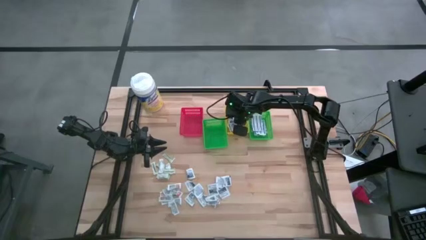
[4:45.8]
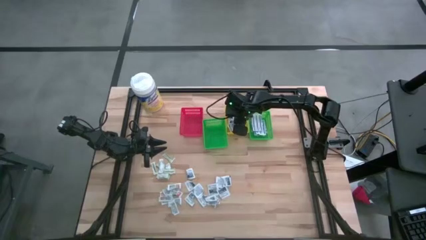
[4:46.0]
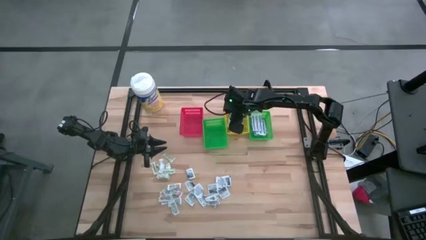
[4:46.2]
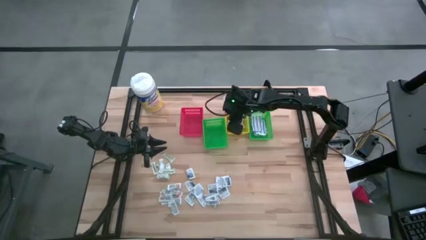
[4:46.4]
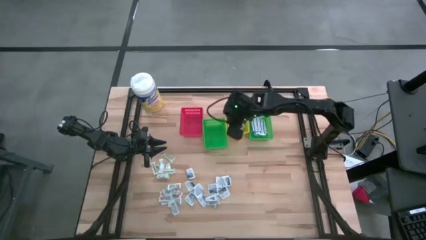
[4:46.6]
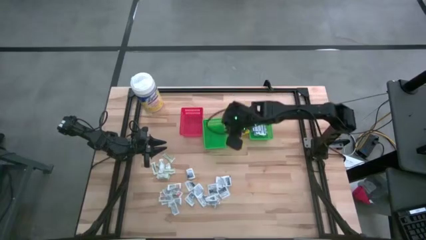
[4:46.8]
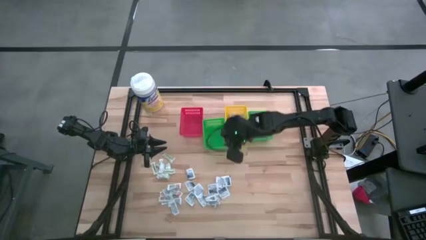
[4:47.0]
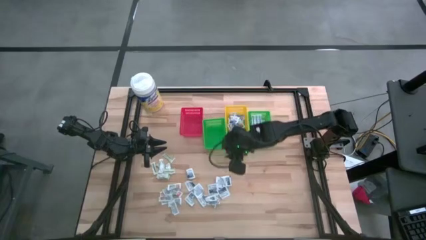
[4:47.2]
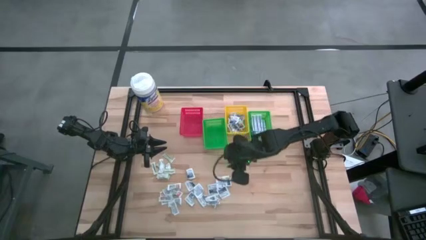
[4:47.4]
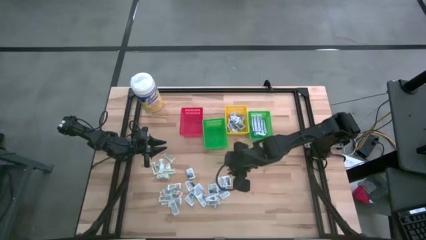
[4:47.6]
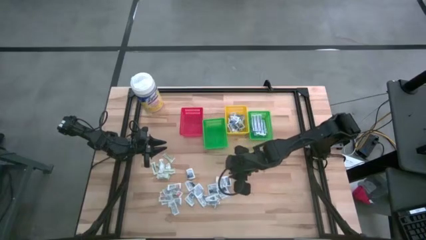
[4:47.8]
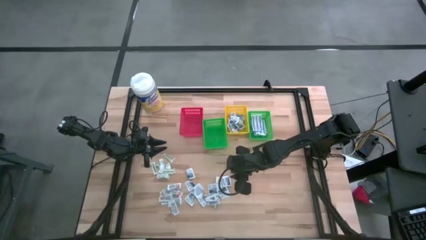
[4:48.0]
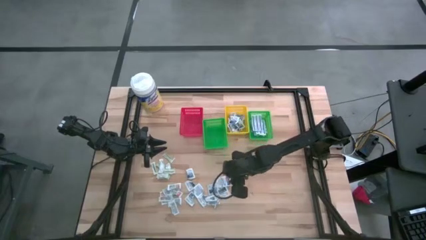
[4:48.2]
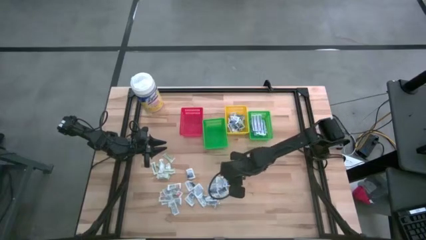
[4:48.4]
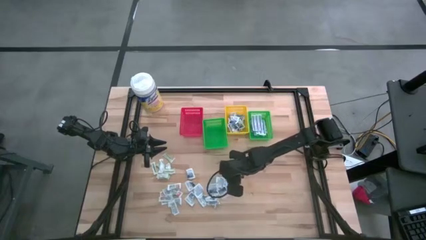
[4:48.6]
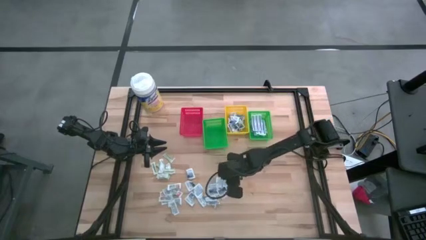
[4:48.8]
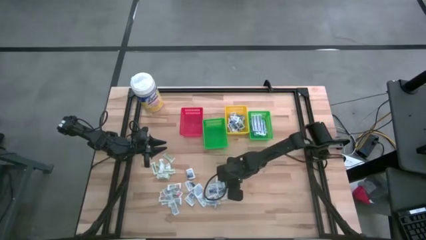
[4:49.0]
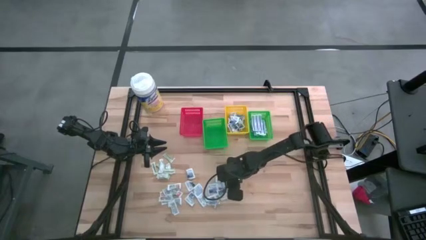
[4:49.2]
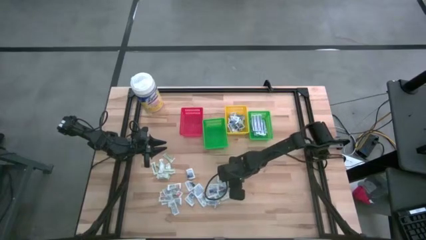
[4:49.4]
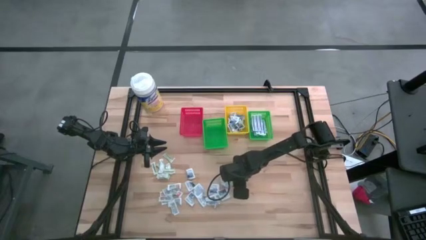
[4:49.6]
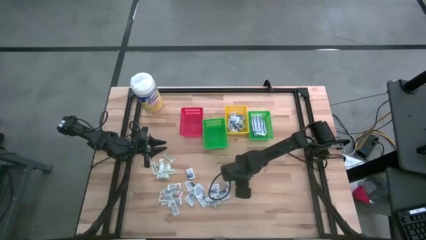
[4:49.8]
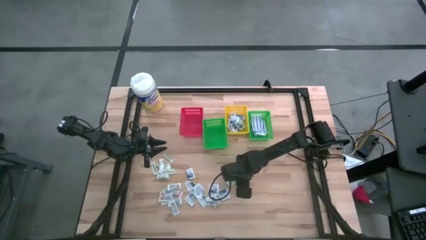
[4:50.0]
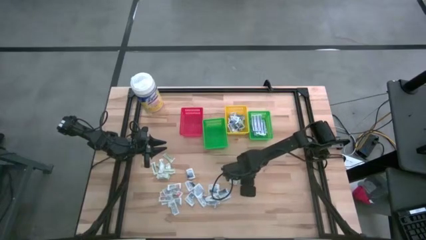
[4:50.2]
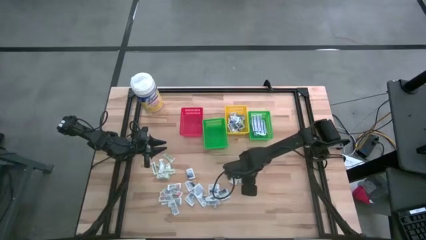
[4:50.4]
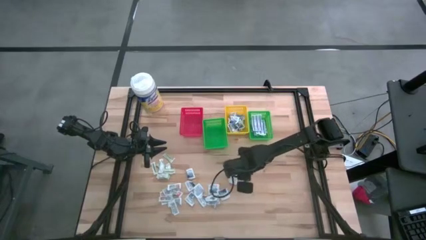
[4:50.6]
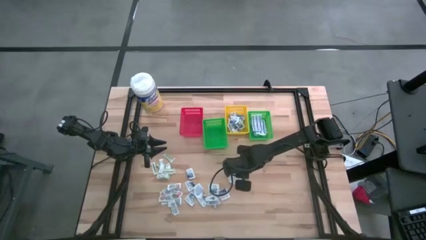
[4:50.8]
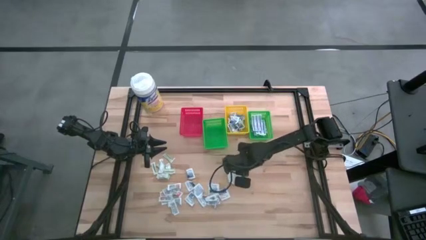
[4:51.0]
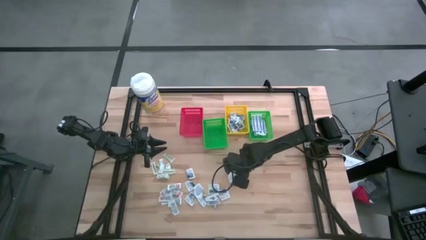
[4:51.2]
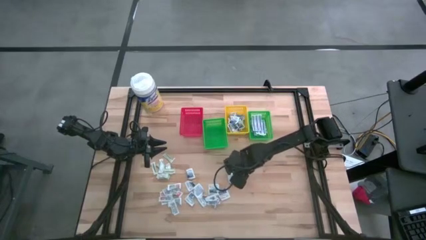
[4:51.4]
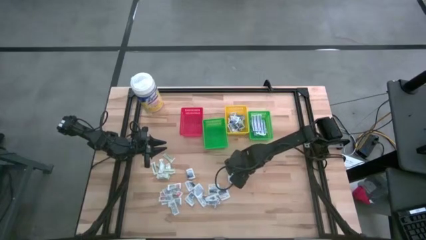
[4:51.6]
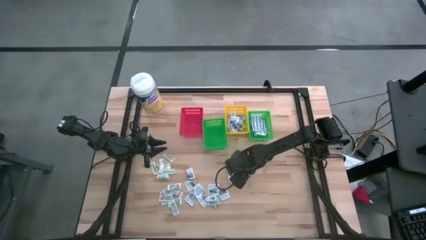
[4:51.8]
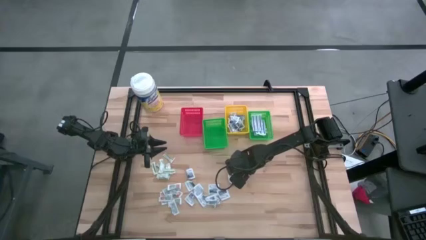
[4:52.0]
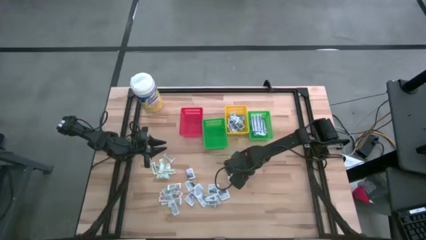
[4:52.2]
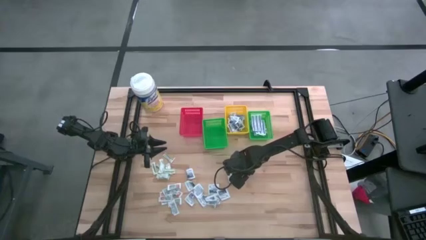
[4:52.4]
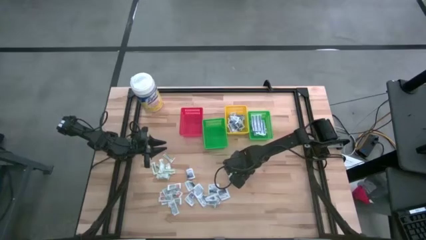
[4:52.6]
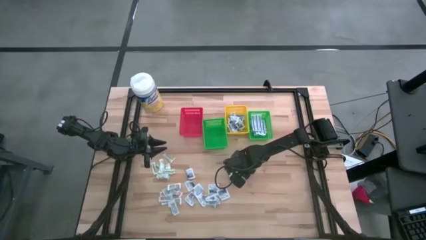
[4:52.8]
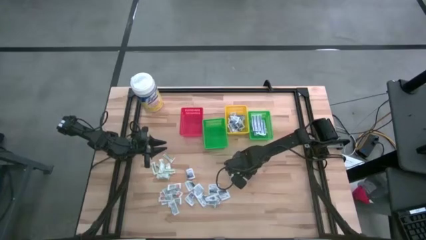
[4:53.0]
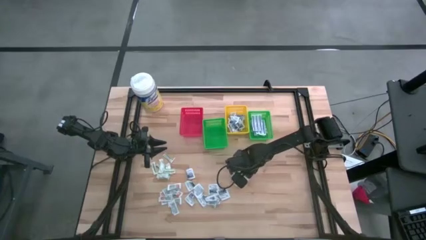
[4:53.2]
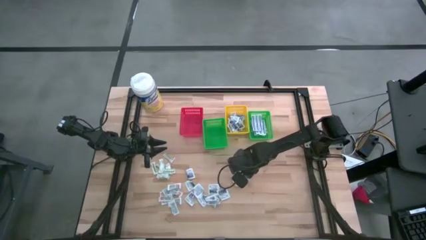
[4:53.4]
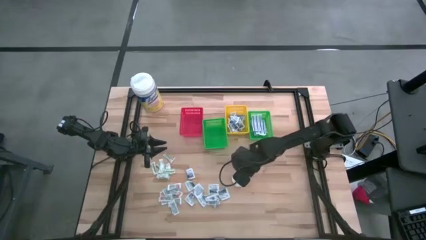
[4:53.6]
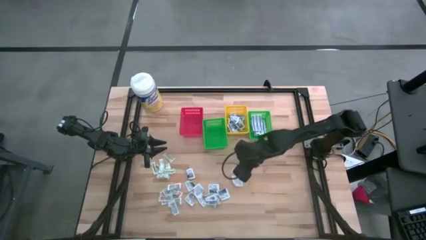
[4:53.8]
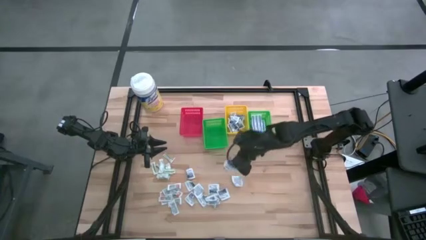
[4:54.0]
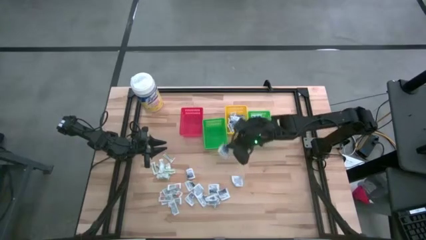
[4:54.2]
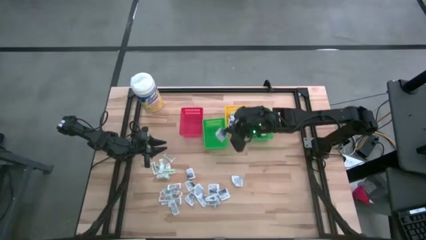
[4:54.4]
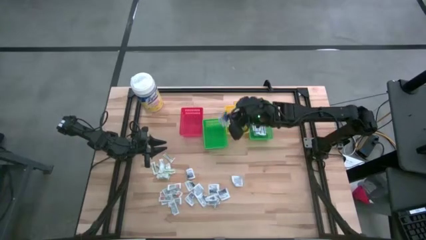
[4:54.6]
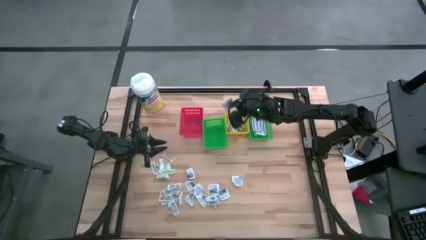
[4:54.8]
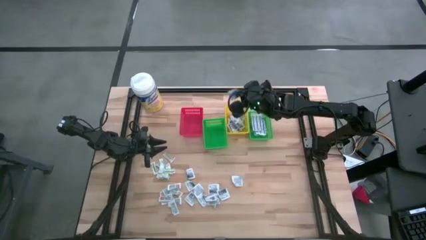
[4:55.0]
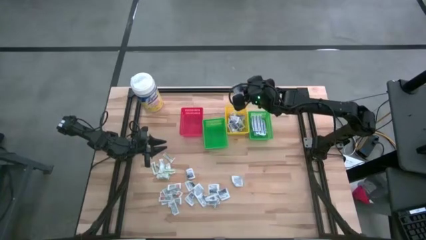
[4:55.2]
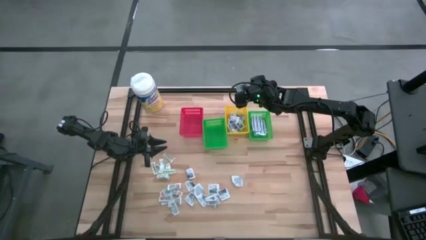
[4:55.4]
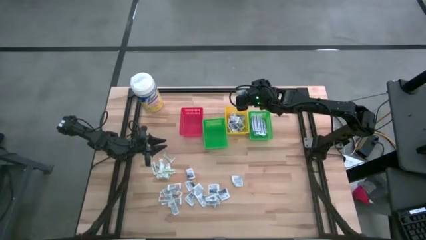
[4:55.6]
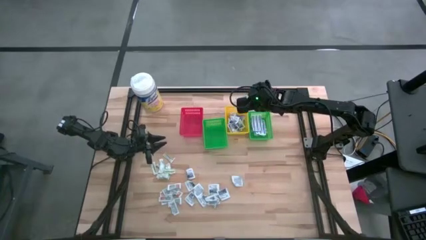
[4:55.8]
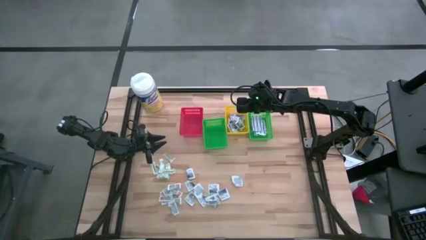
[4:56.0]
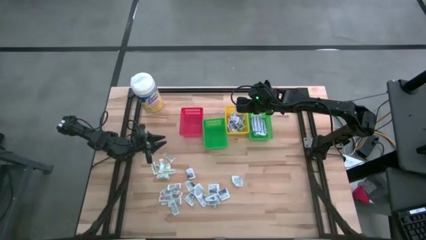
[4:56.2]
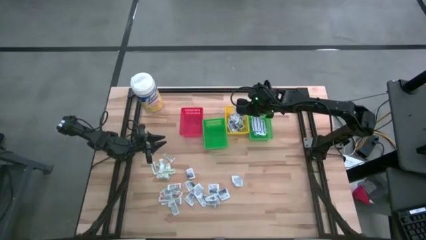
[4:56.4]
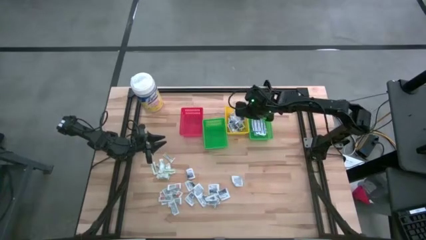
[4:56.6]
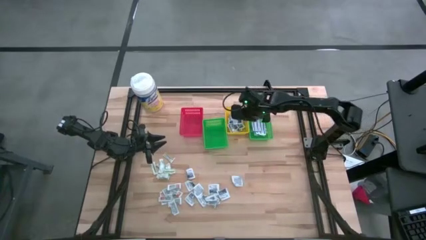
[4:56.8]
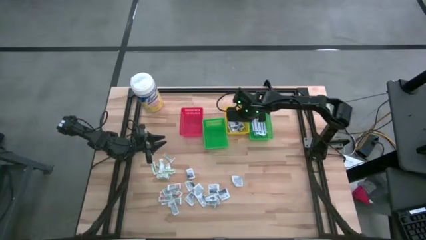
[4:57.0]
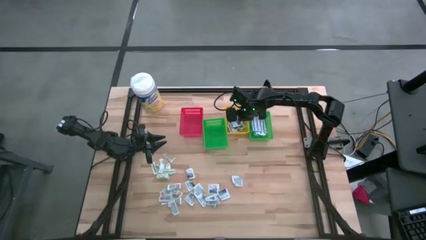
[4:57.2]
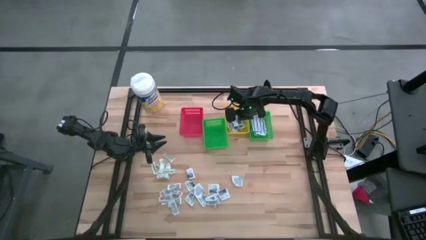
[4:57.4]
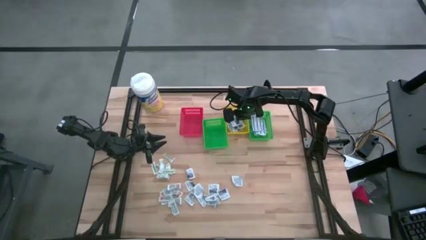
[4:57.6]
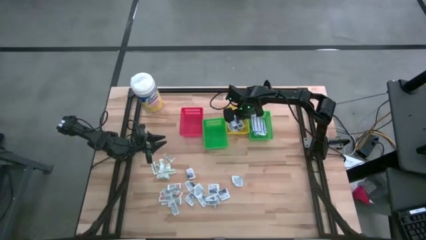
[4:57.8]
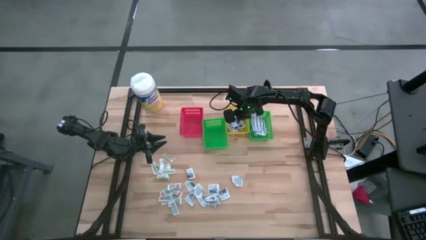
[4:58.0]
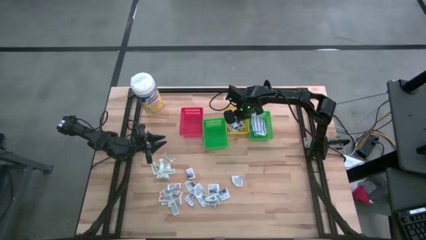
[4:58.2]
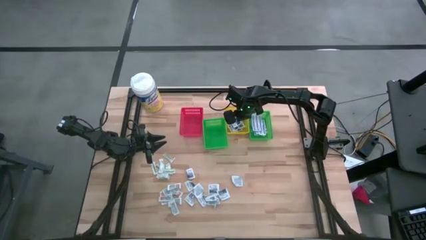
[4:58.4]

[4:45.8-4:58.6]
Task: Pick & Place First Aid Supplies
Put the alcohol pad into the yellow basket

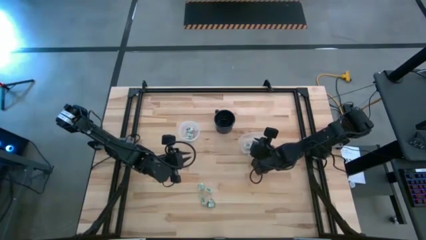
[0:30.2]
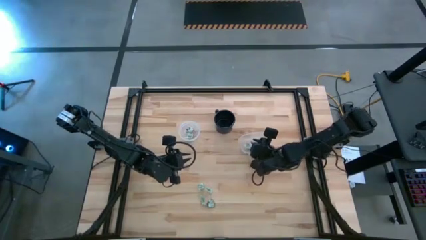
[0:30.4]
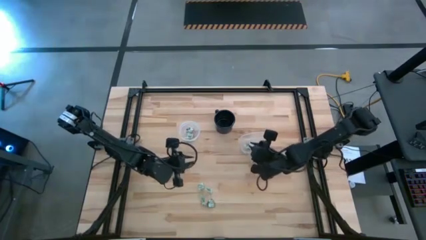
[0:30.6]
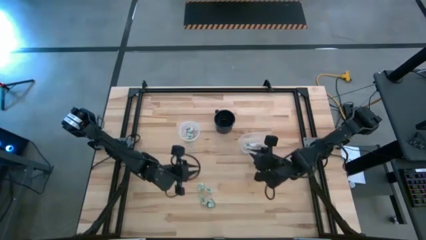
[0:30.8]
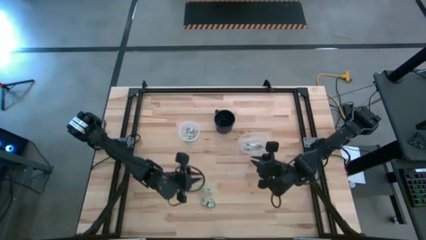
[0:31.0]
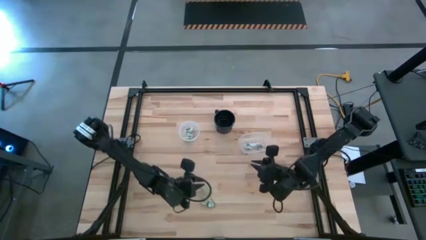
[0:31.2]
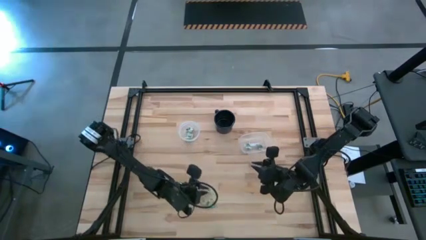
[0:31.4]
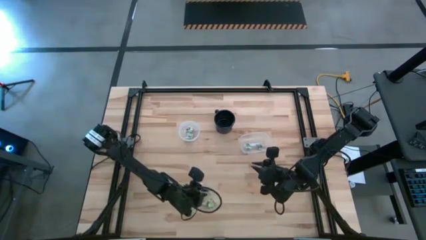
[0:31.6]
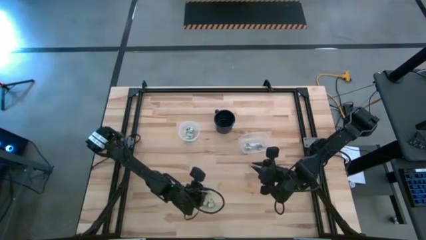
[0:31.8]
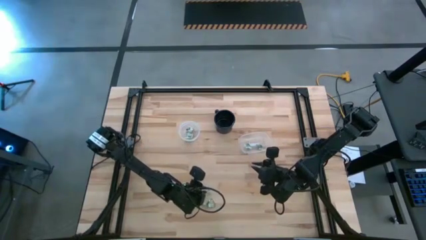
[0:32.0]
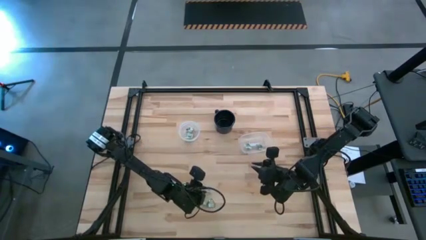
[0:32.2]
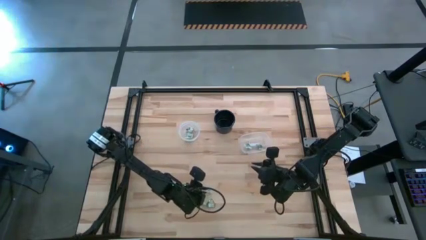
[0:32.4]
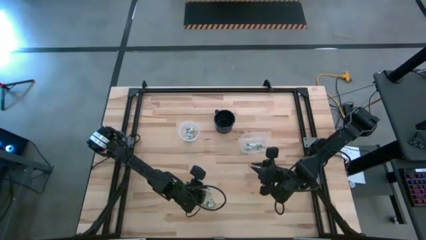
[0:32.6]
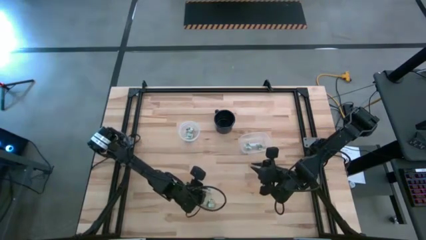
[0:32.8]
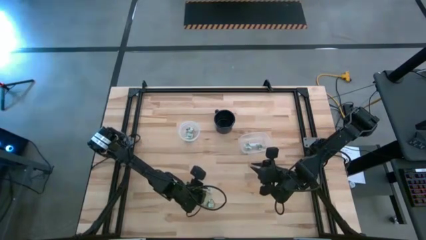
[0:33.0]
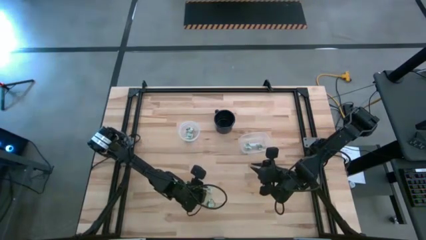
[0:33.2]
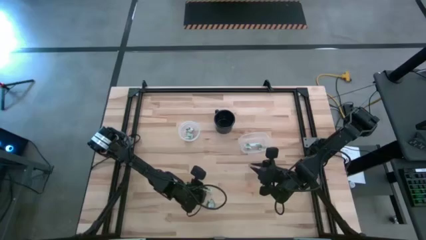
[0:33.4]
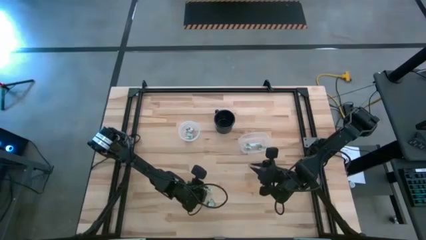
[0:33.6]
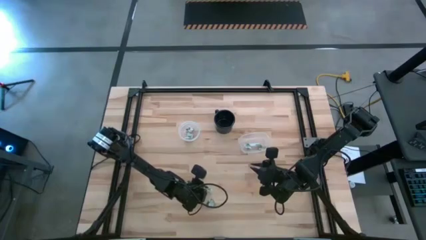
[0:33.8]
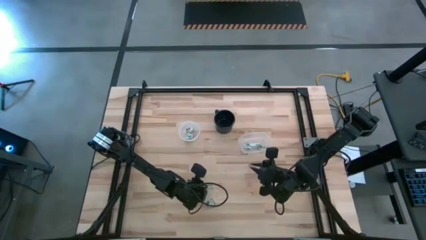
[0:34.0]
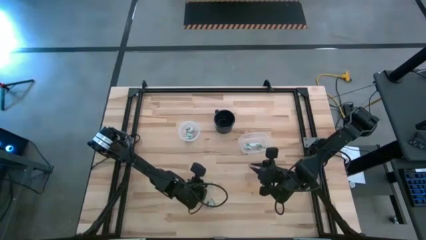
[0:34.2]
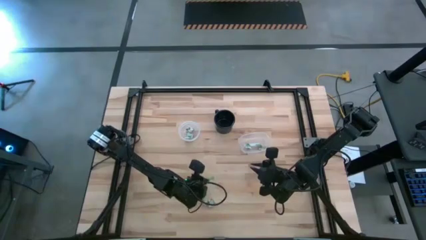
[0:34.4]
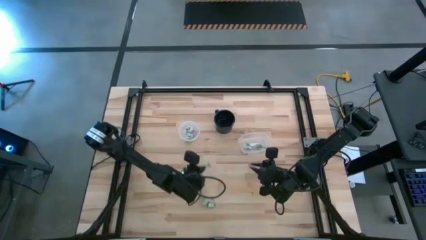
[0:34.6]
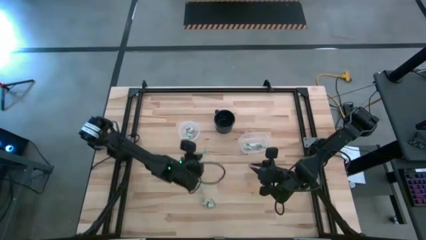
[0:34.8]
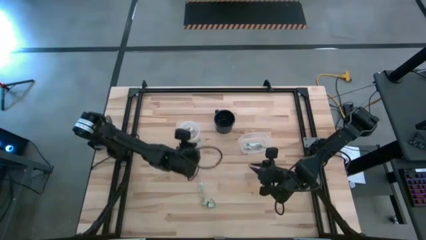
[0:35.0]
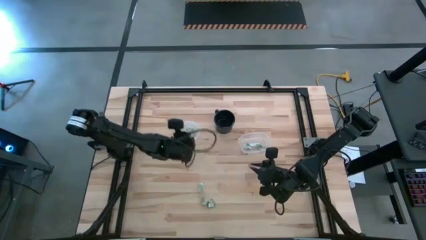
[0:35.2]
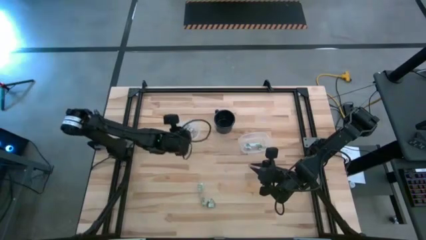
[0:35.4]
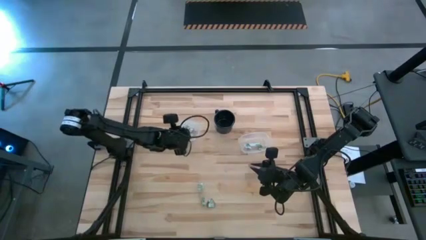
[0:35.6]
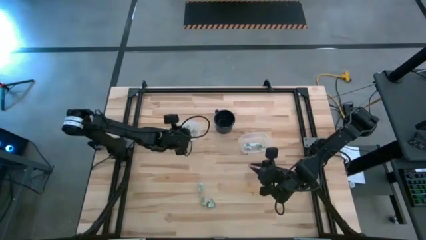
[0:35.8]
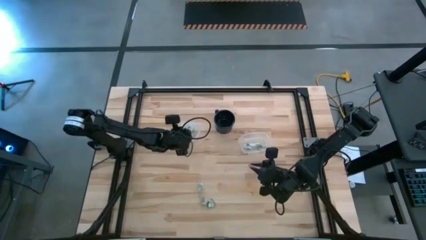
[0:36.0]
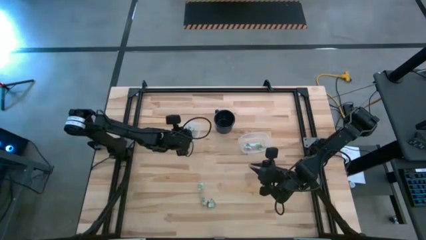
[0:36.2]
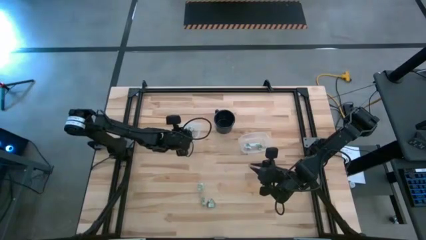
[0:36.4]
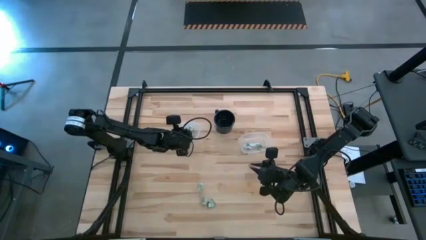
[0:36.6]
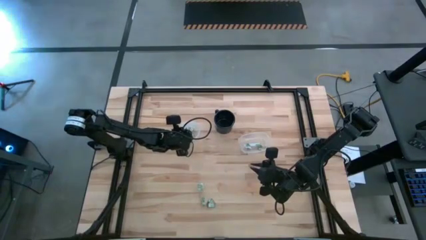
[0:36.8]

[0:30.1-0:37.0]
Task: Pick and place items into bin
Put the stevia packet into the left transparent bin
